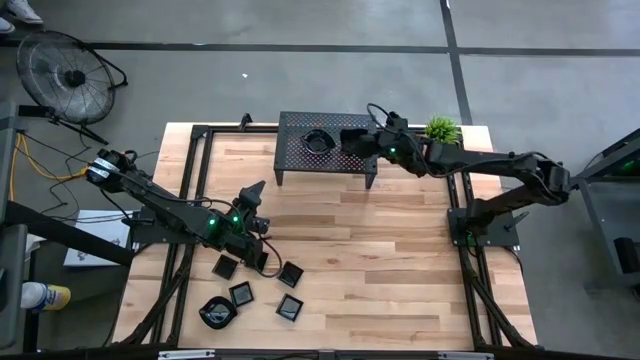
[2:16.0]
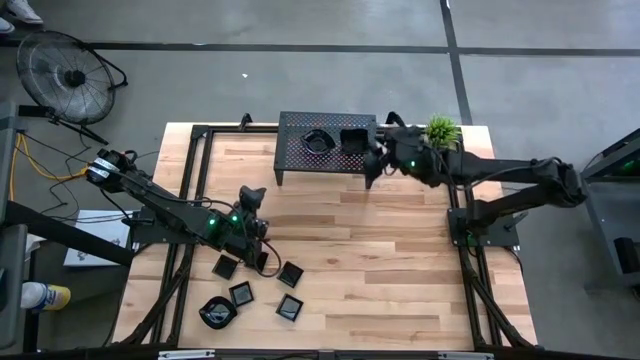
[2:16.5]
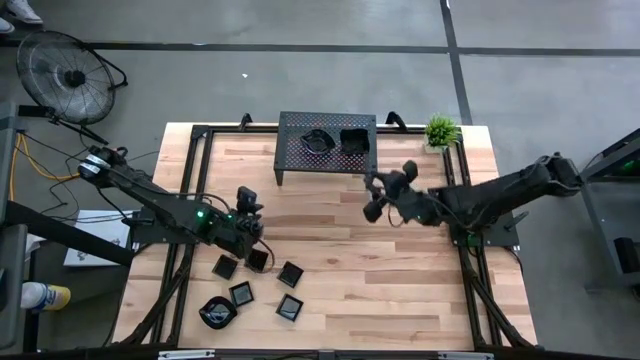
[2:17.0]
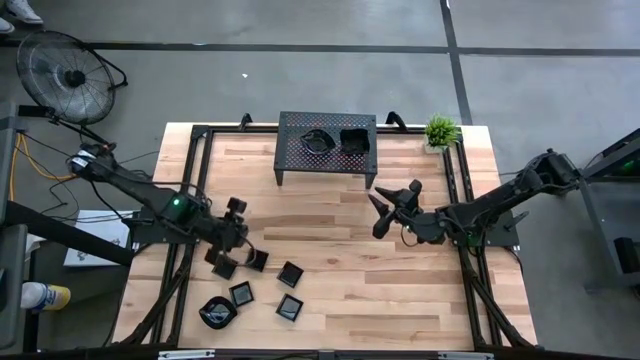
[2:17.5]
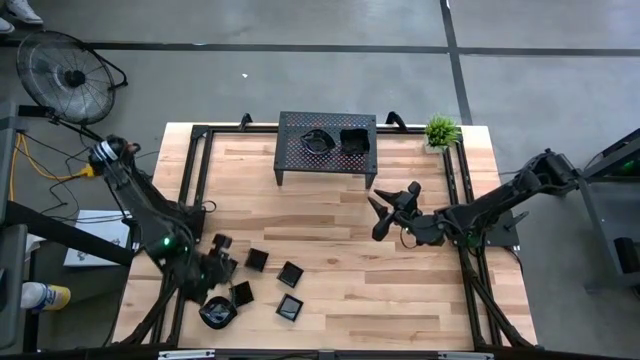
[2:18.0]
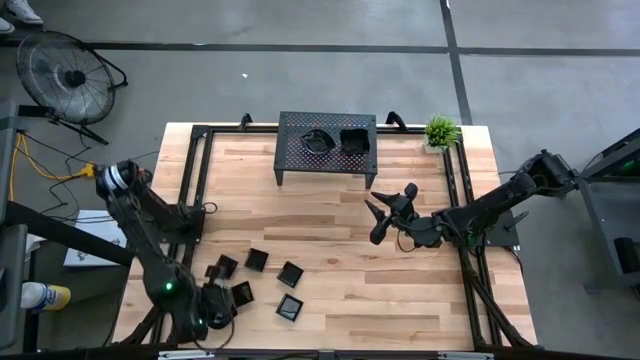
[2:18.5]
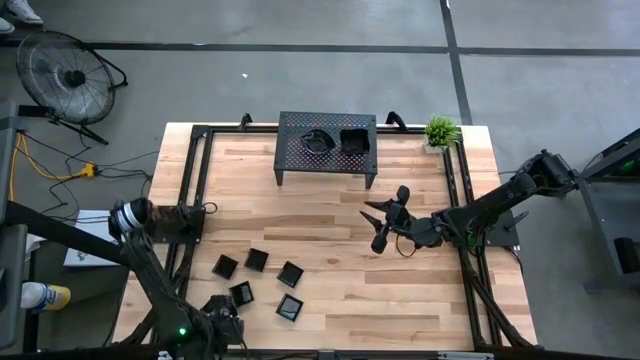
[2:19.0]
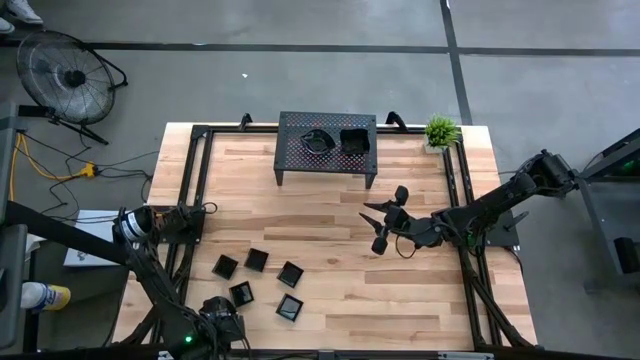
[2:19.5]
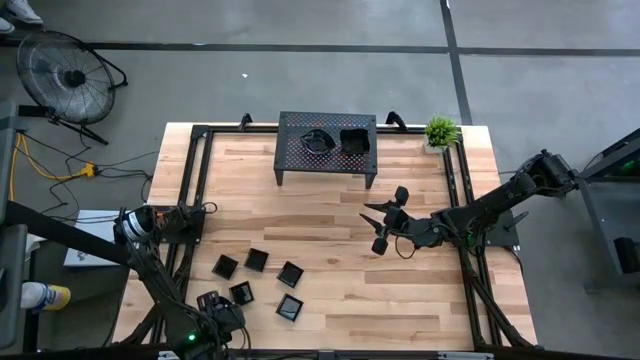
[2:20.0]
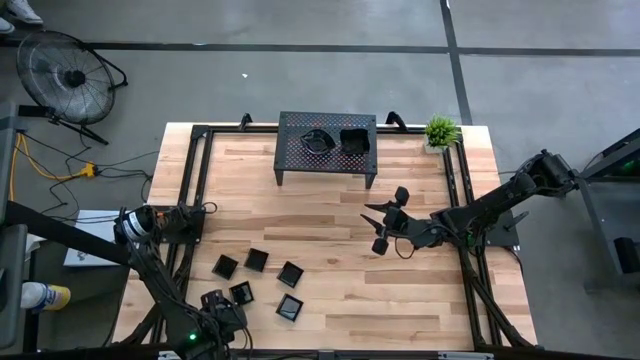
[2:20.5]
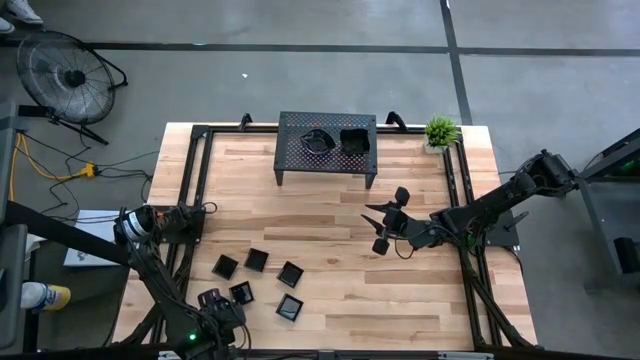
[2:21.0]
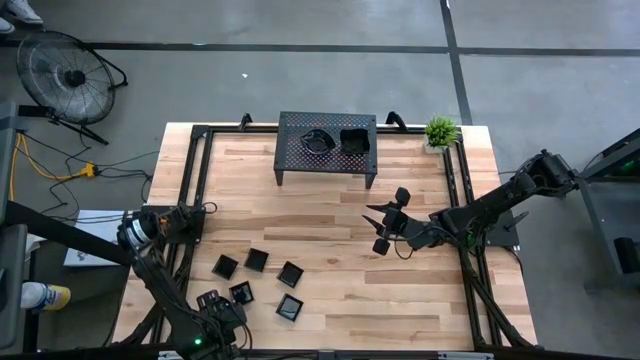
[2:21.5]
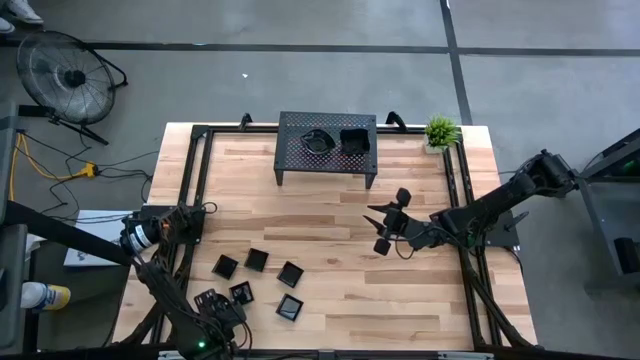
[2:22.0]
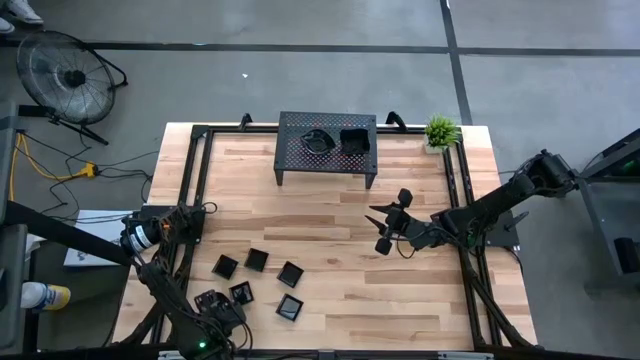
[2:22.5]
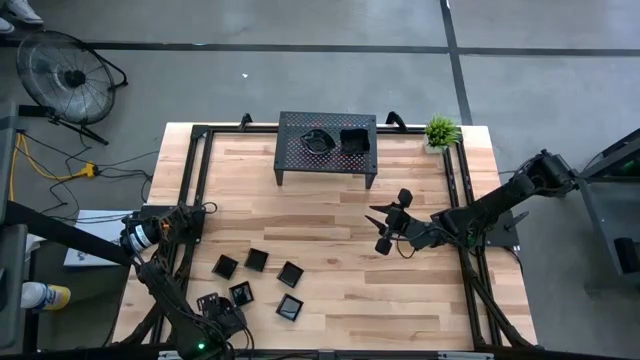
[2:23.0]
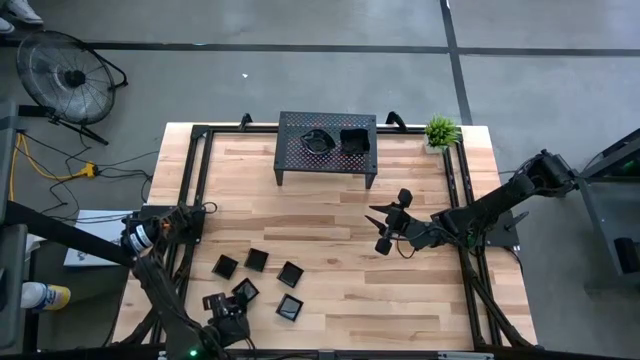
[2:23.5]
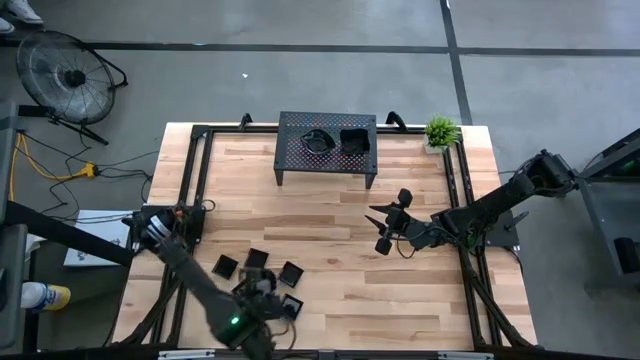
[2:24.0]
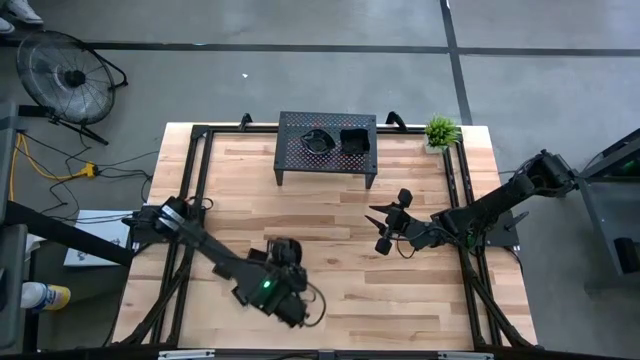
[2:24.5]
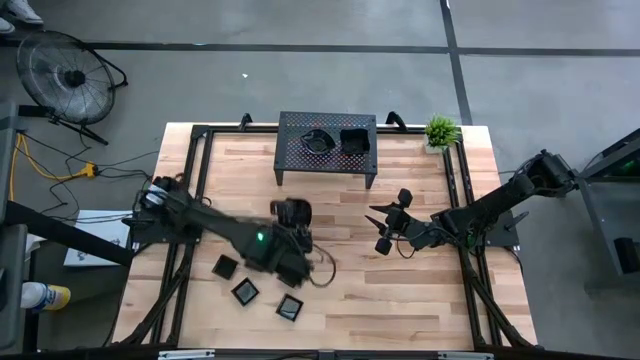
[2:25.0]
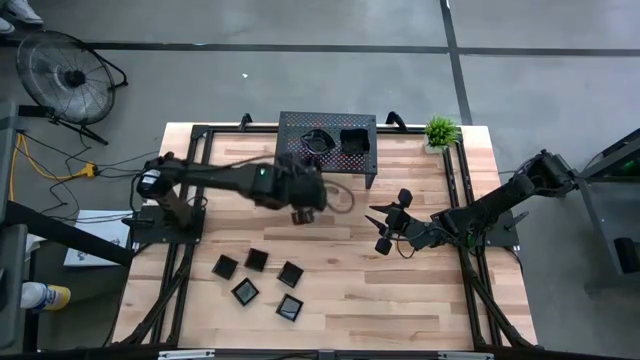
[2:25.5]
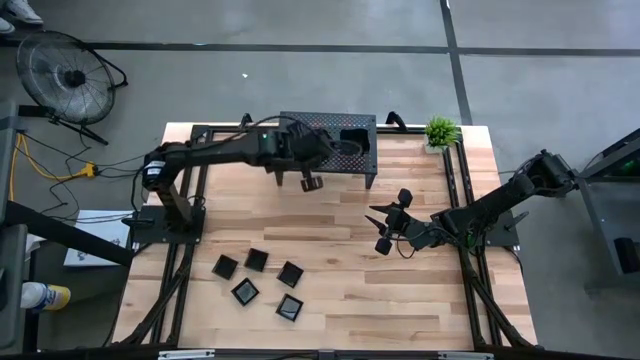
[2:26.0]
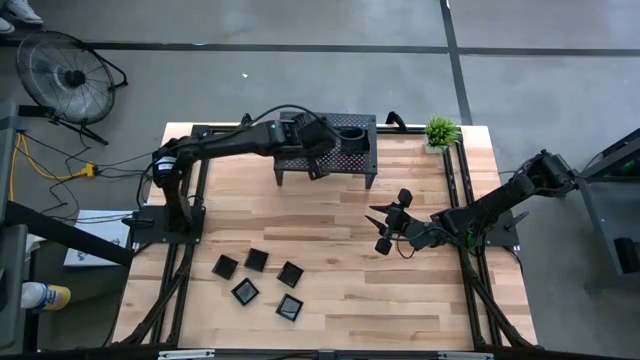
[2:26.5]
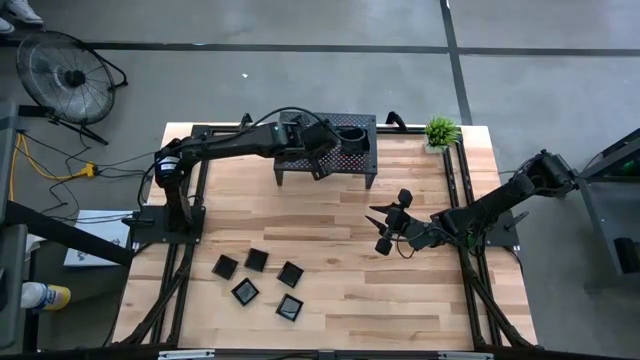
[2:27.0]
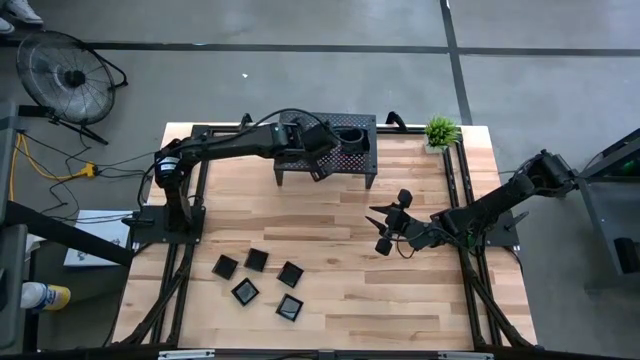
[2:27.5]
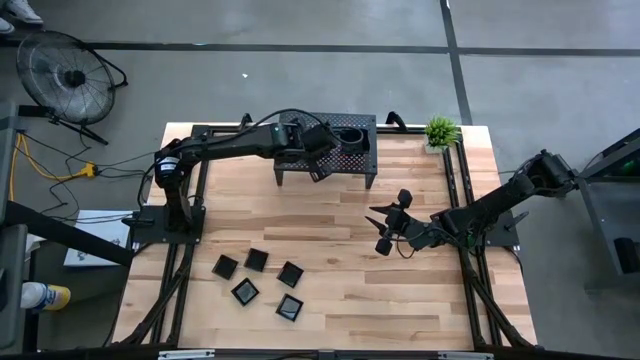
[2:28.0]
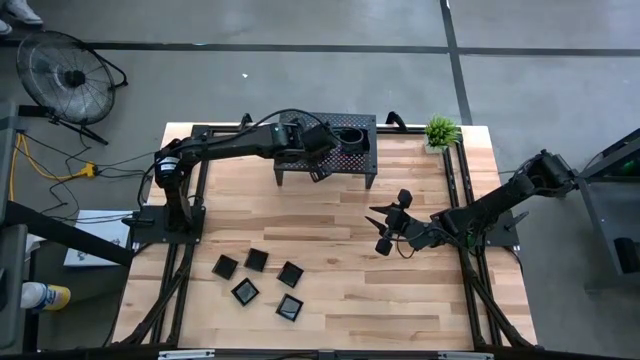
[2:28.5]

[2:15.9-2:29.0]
Task: Pick & Place Mini shaped plates
Stack the black leaf shaped plate on top of the black leaf shaped plates on the shelf

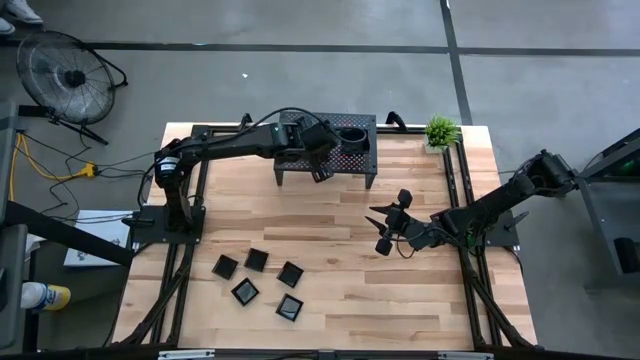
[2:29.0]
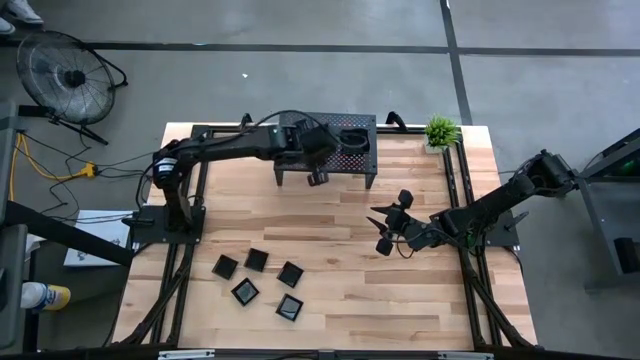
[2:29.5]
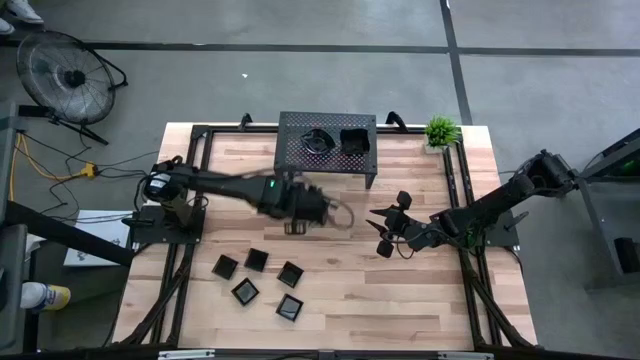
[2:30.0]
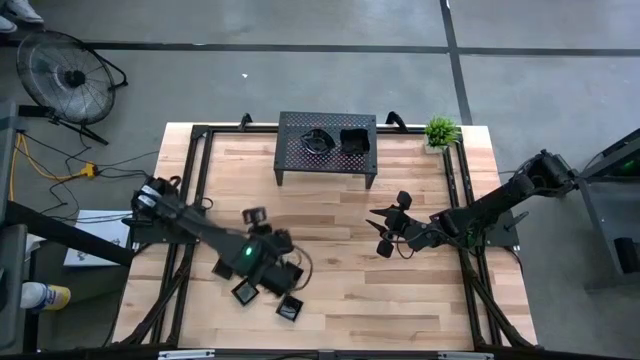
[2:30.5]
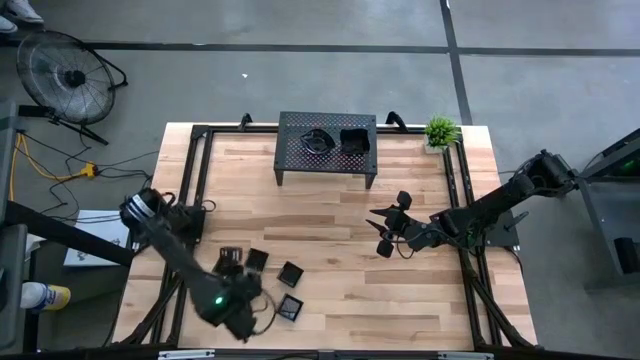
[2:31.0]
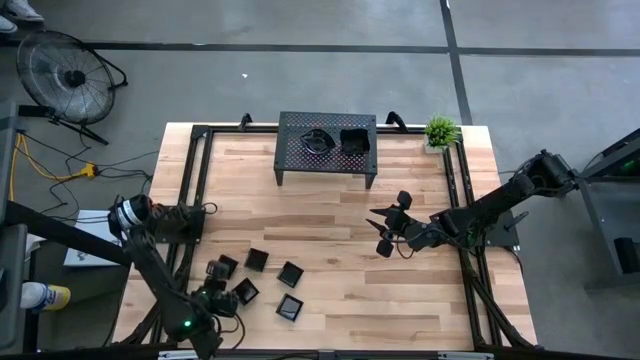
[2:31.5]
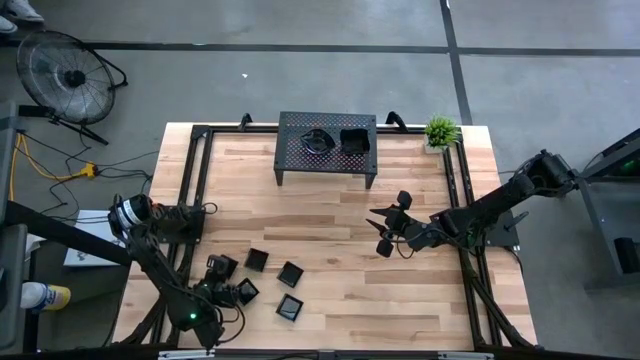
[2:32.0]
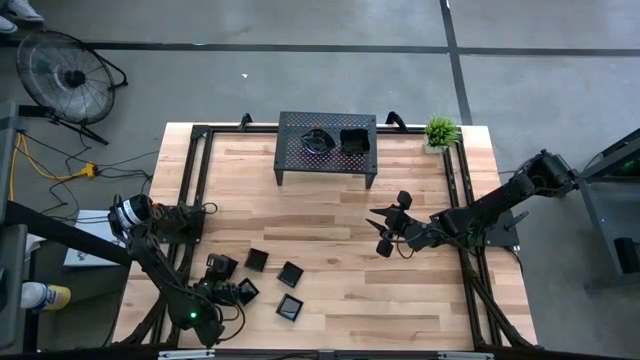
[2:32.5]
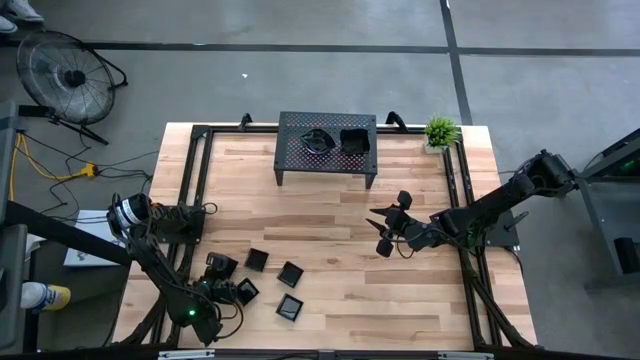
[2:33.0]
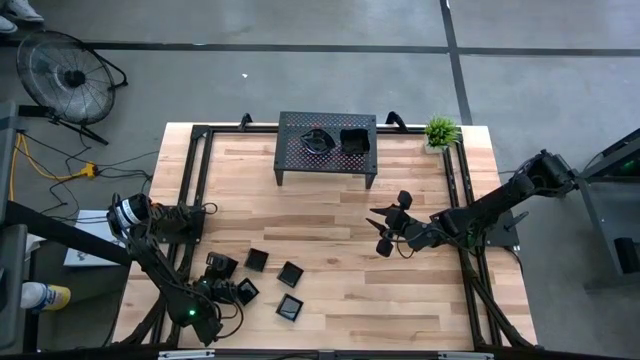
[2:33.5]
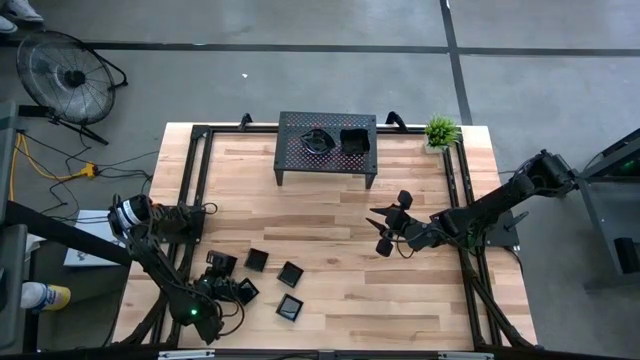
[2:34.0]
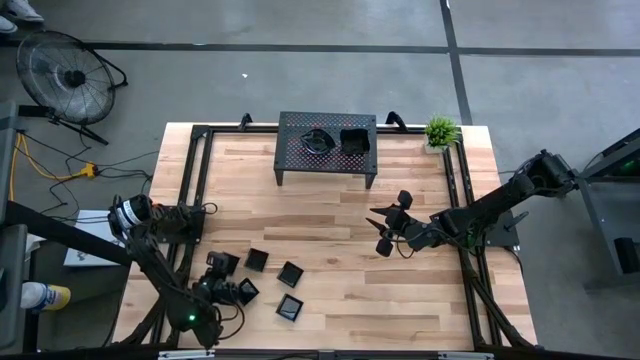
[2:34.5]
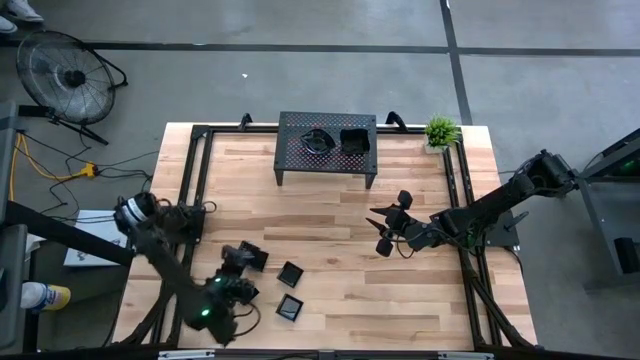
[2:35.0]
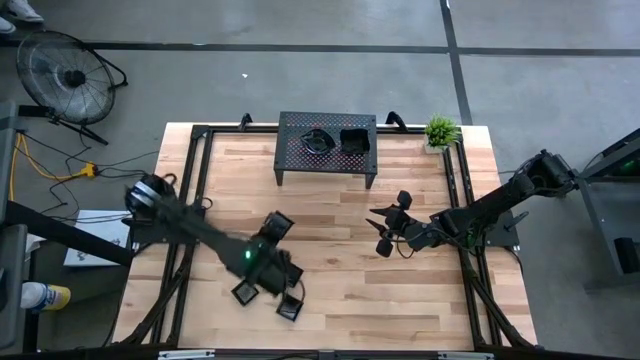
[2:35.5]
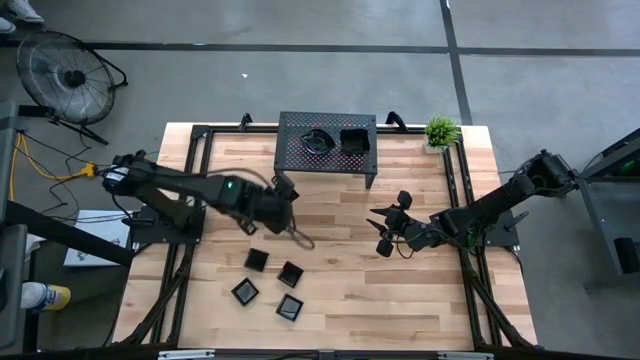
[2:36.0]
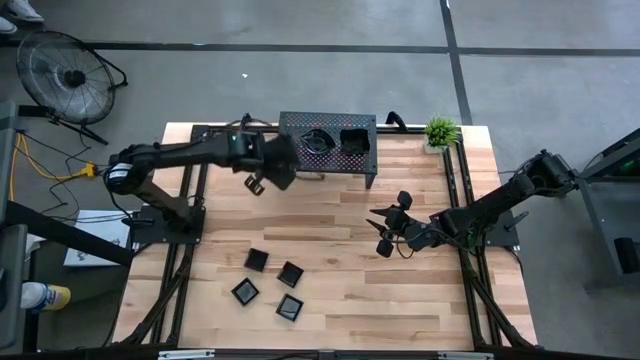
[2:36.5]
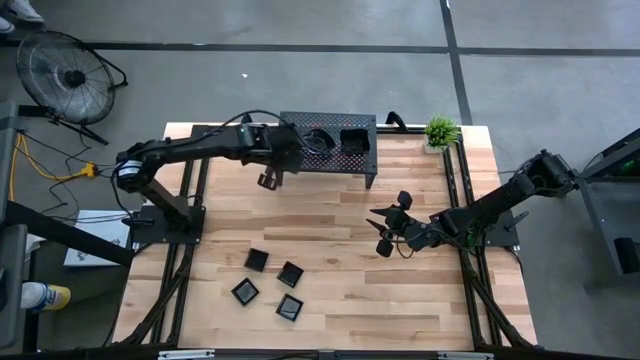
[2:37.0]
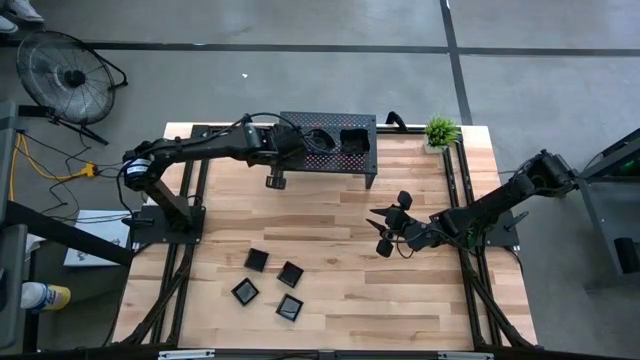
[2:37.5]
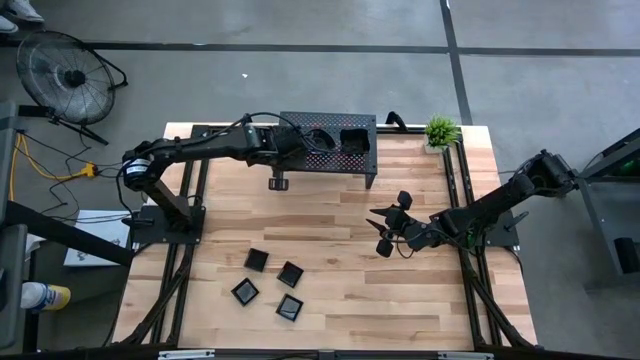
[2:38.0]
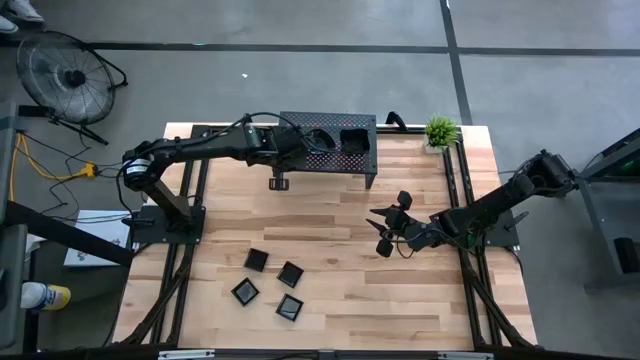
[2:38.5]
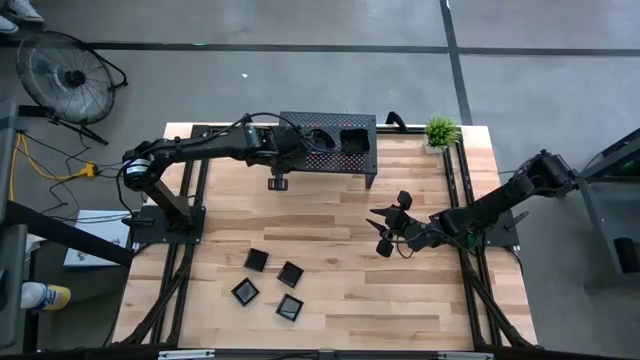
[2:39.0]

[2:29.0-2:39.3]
Put the bottom left black square plate on the shelf
